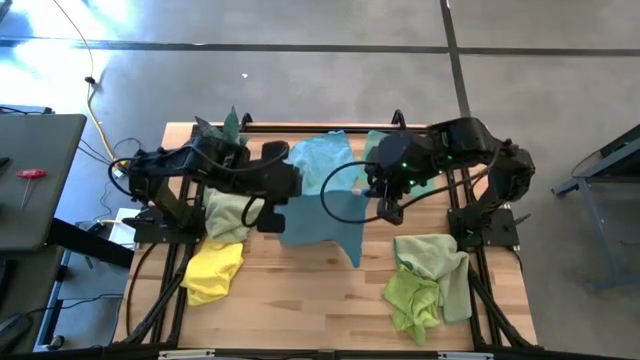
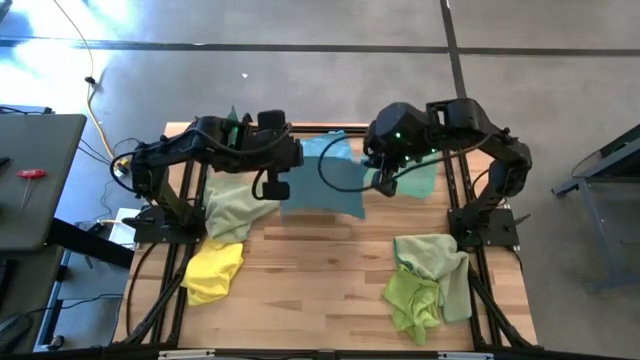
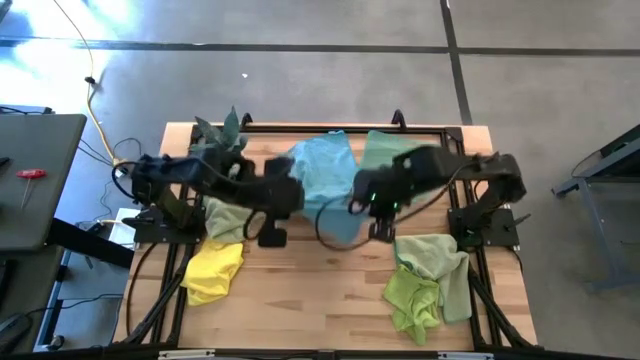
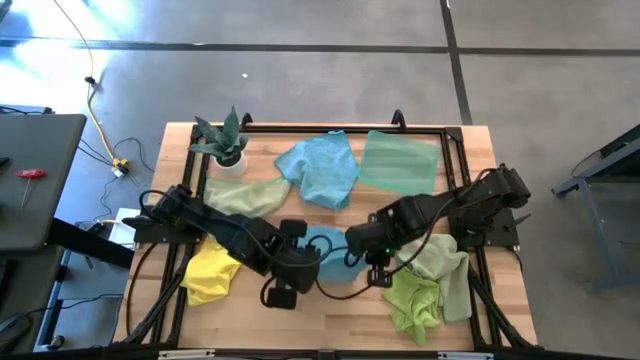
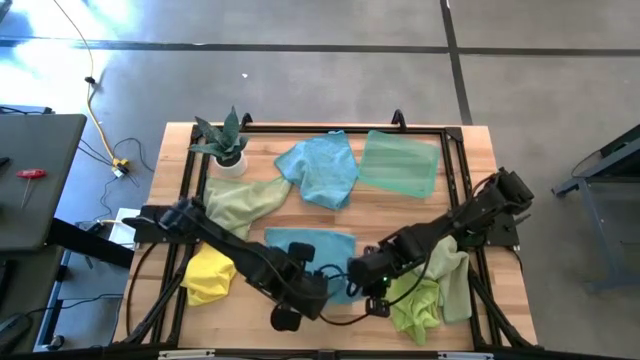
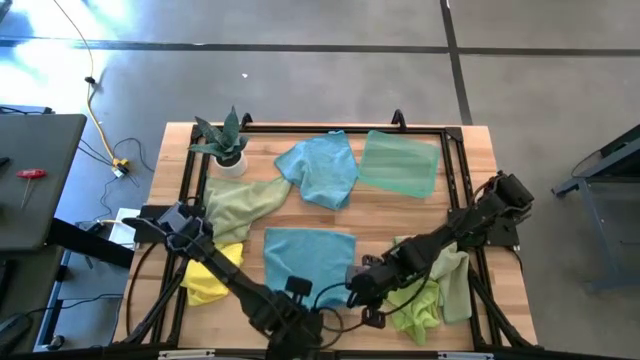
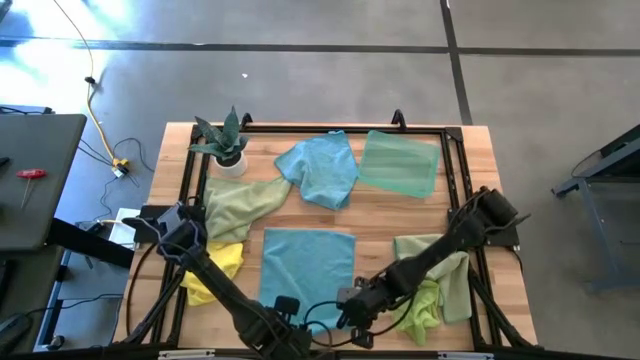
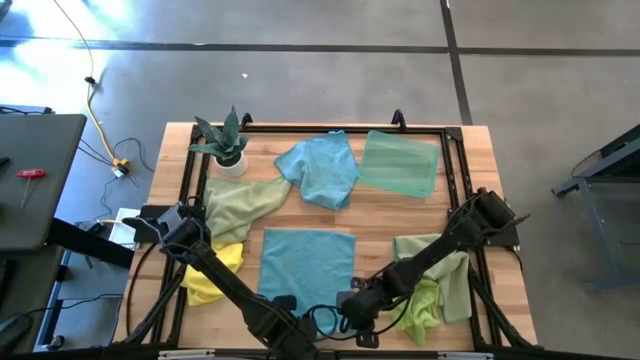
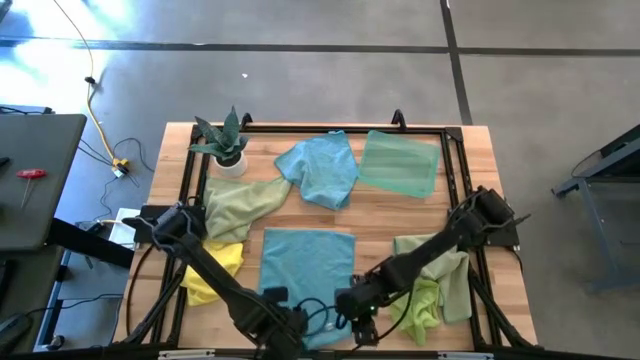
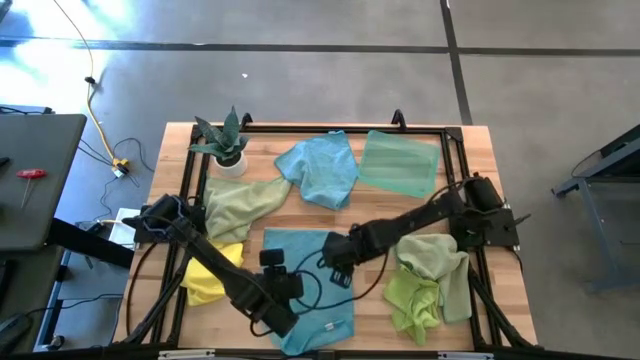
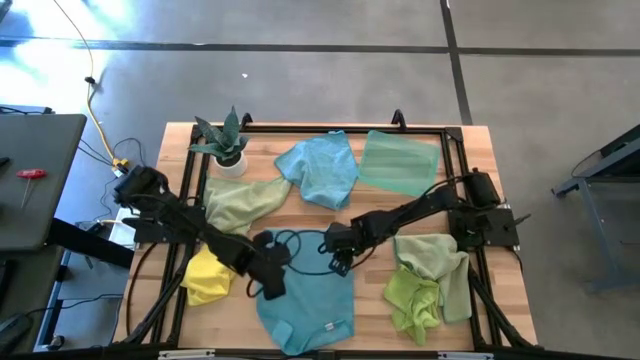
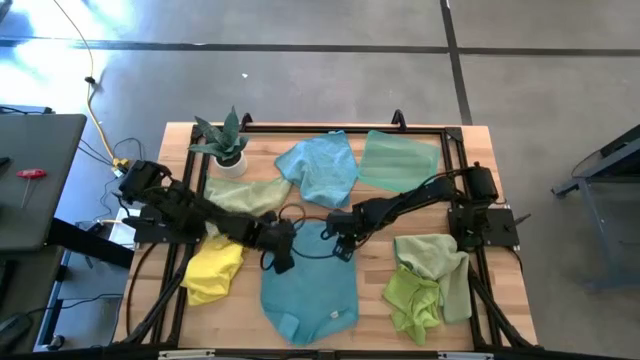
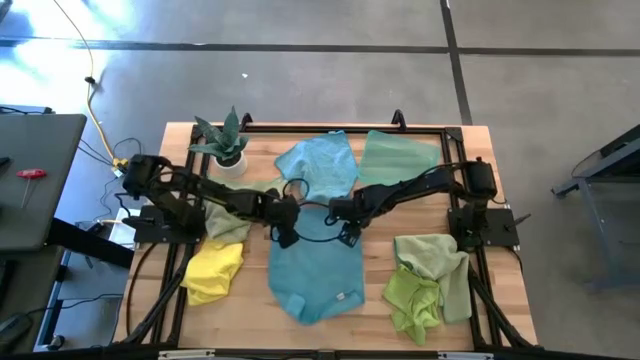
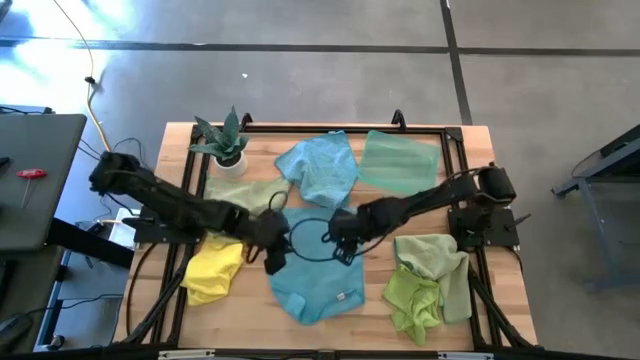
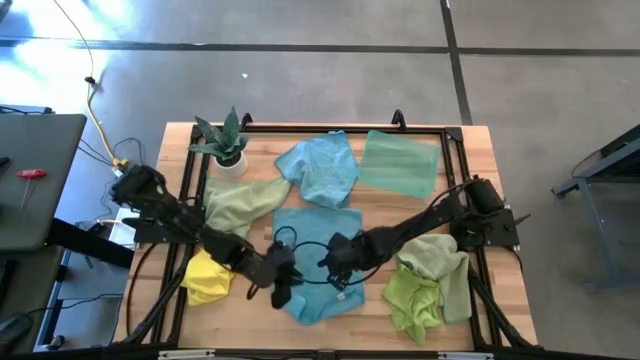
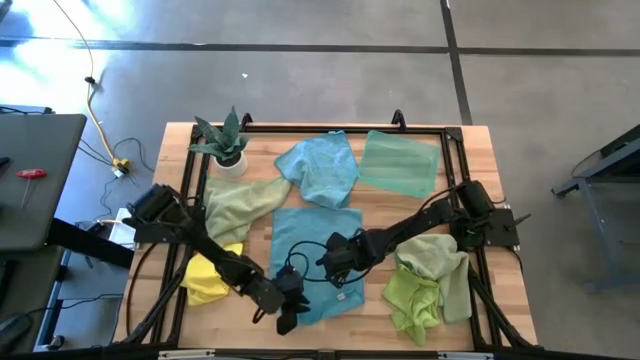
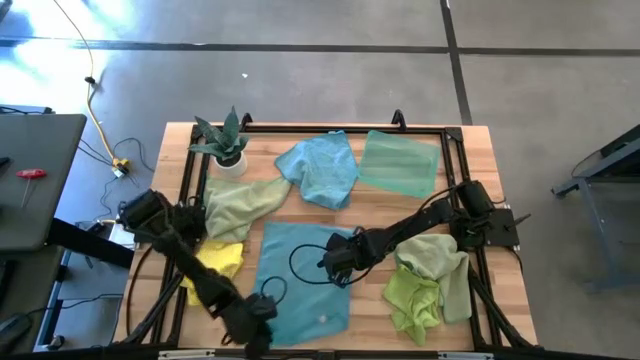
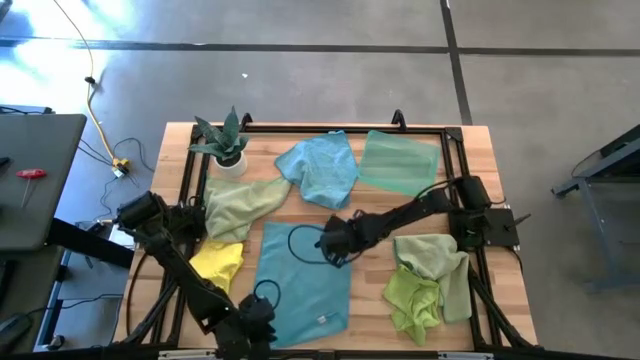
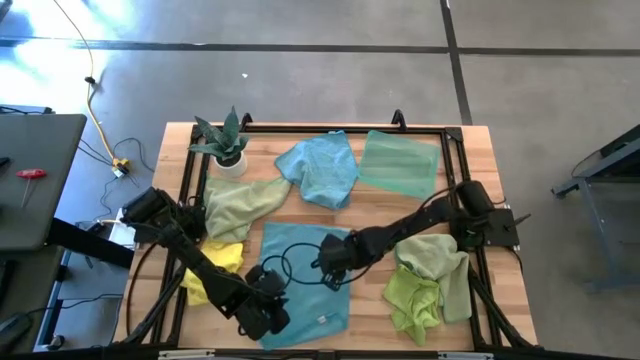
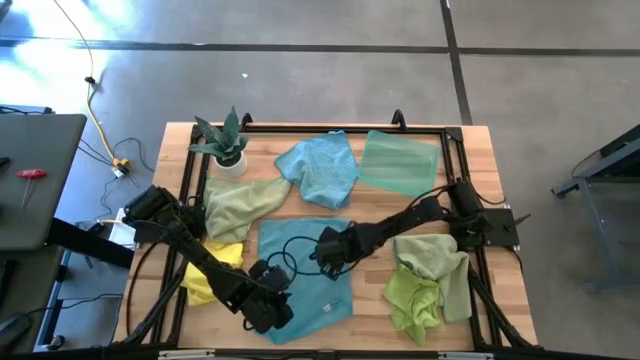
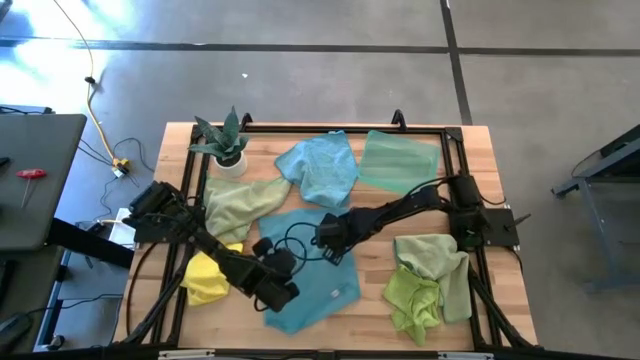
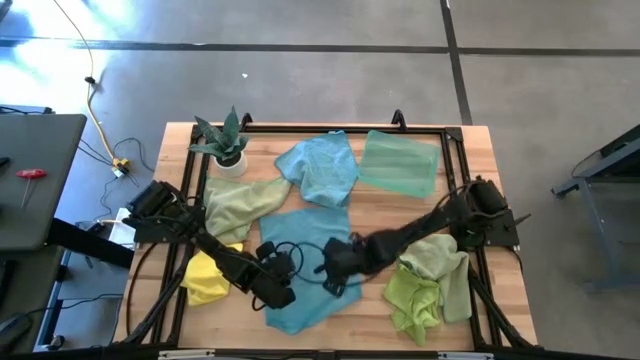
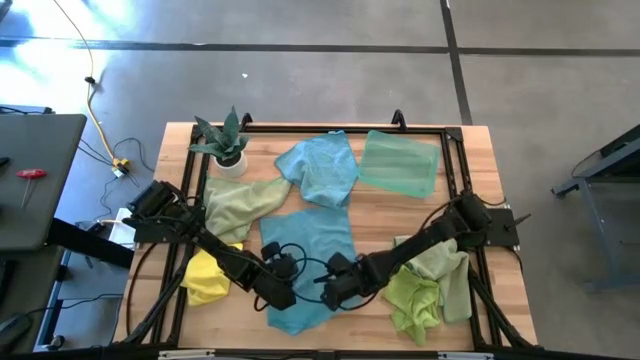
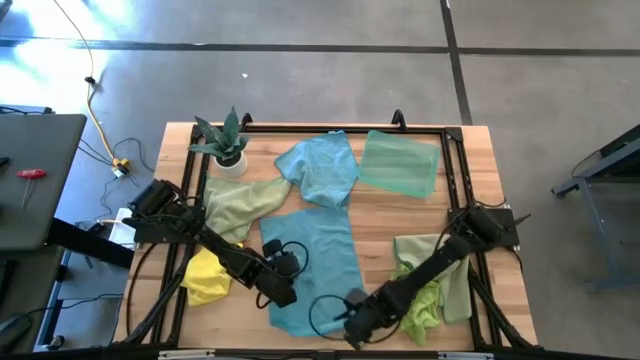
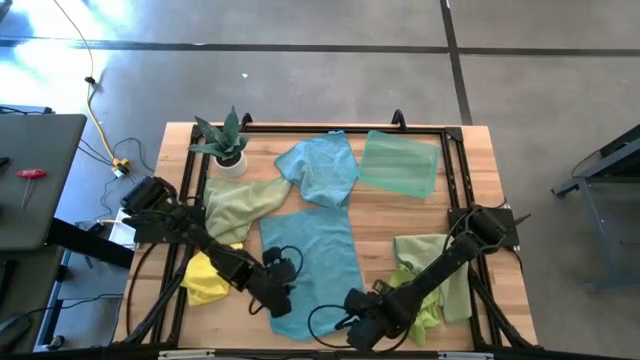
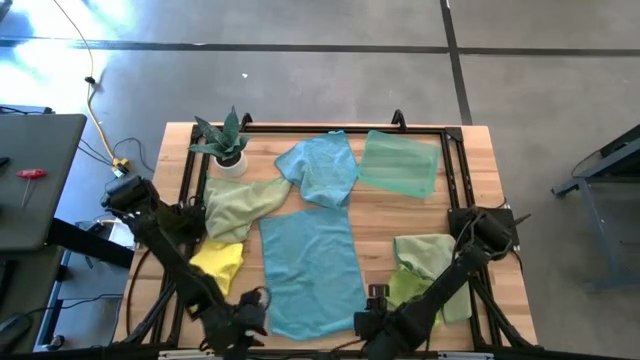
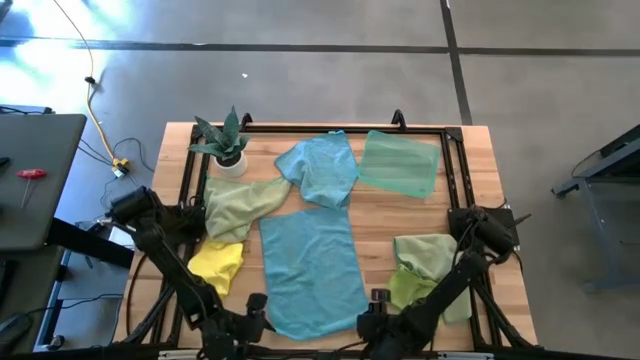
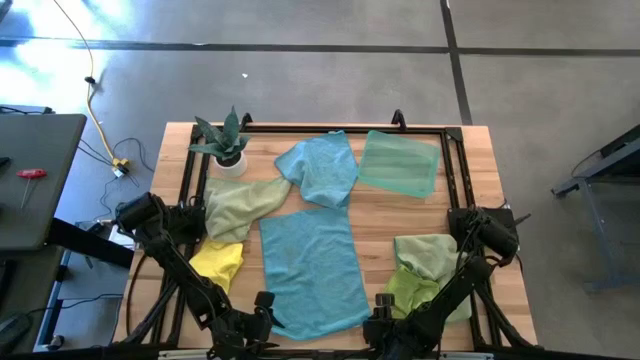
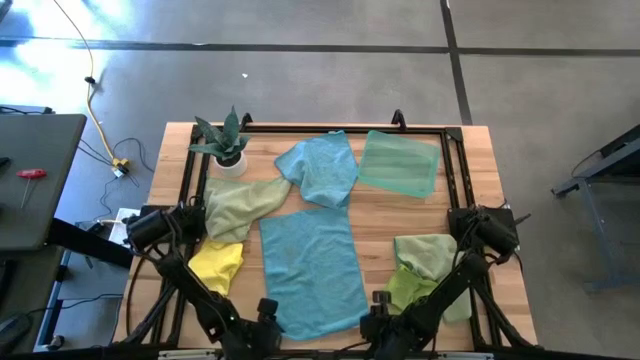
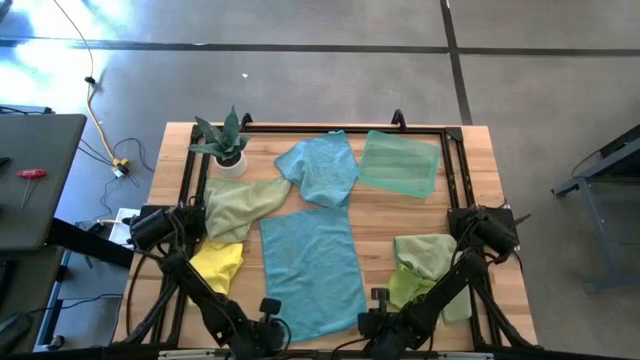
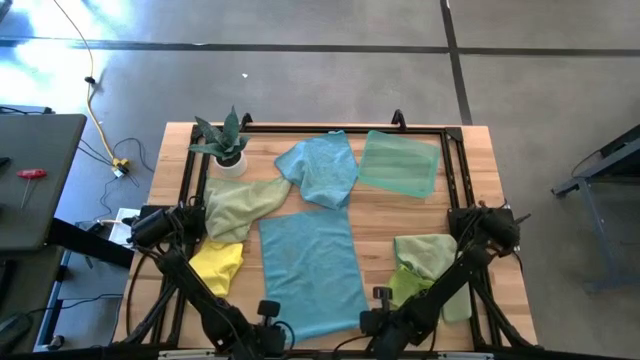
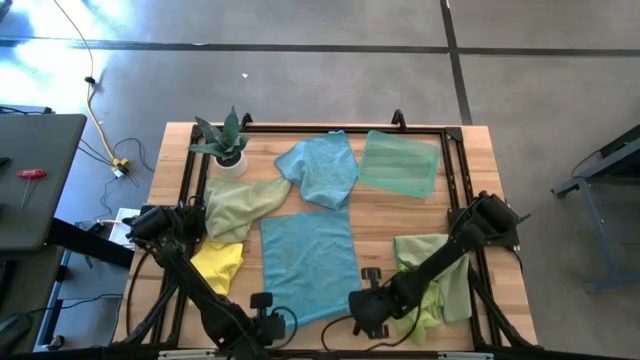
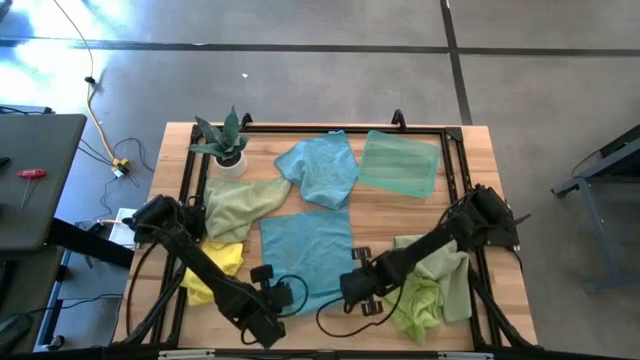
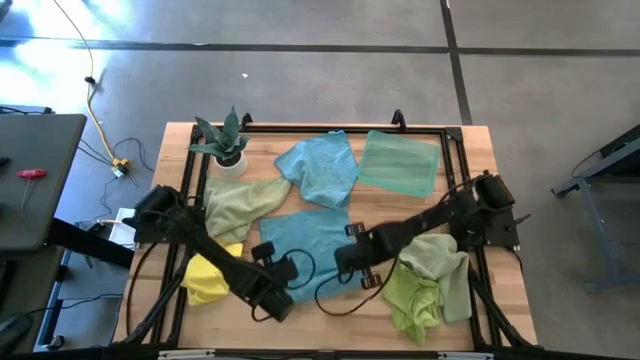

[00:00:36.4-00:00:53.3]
Task: Fold microfiber towels
Fold the bottom blue microfiber cloth

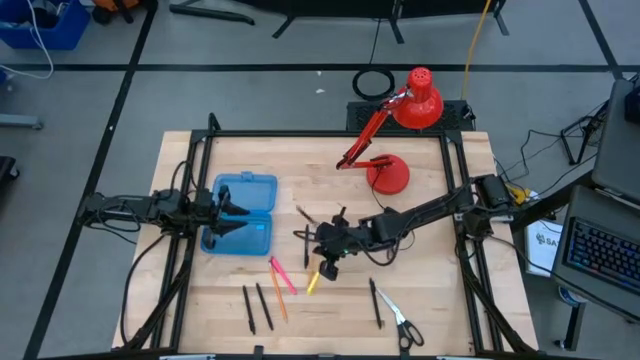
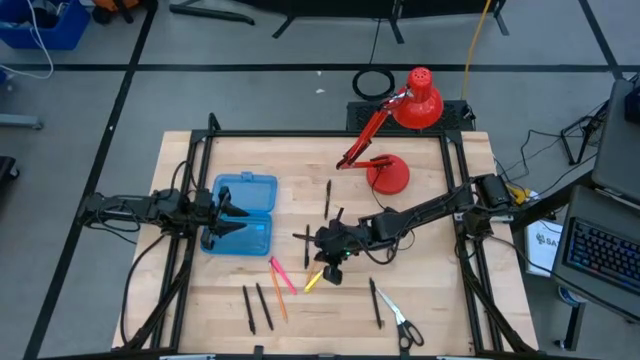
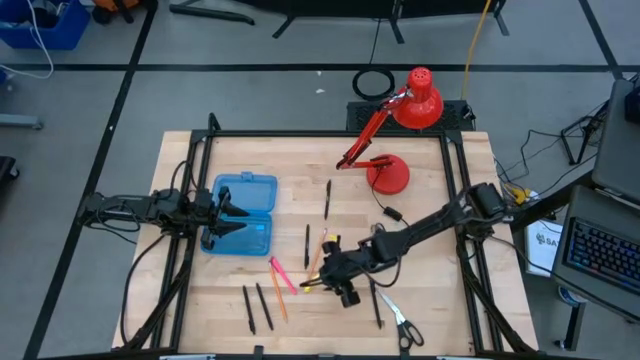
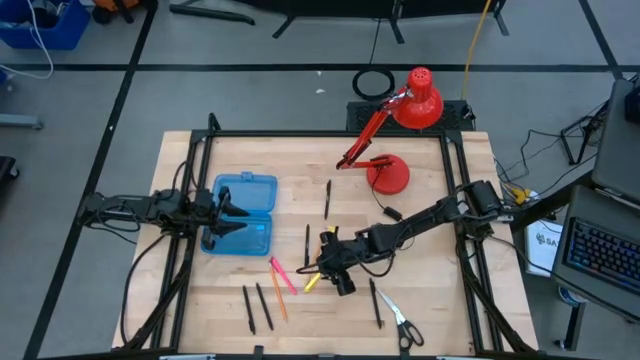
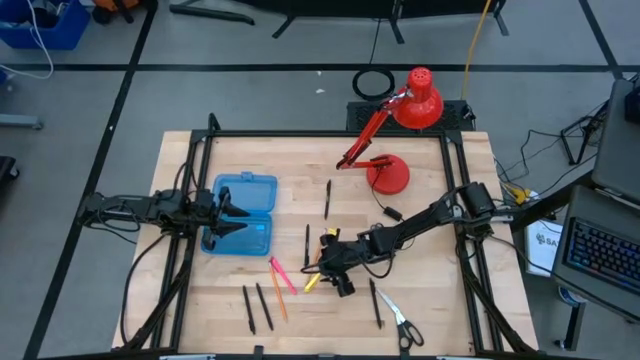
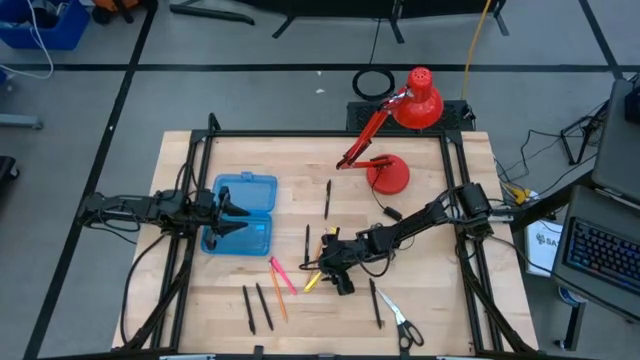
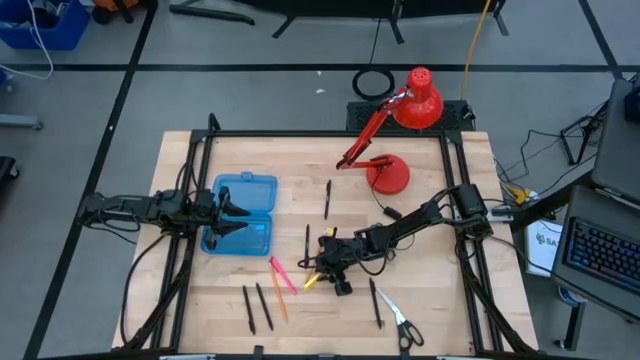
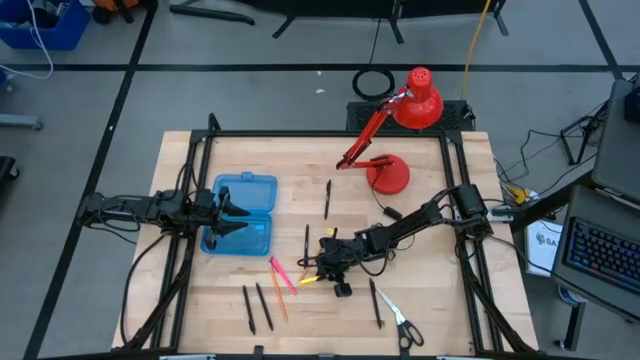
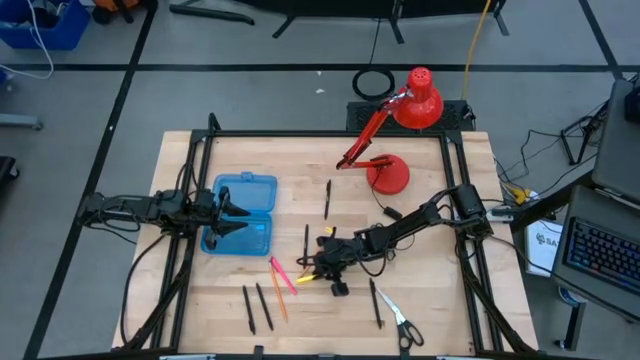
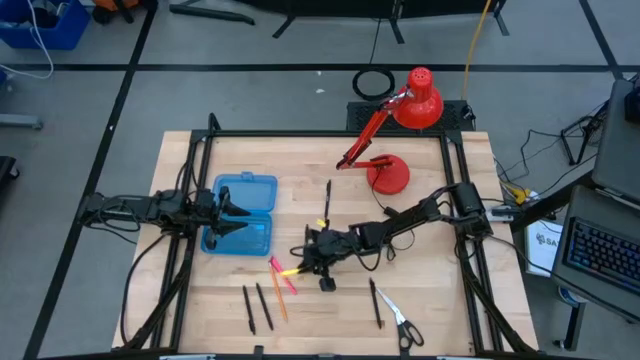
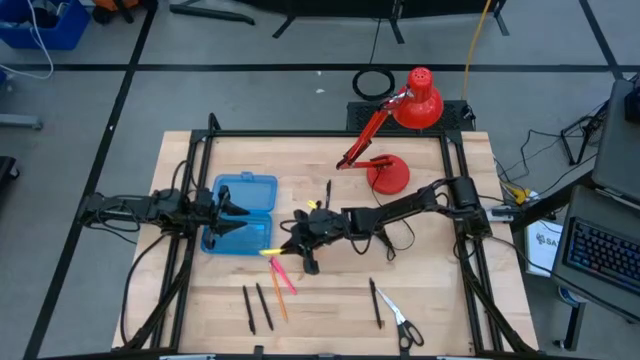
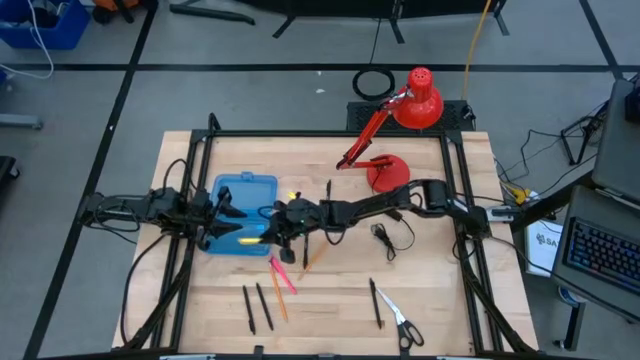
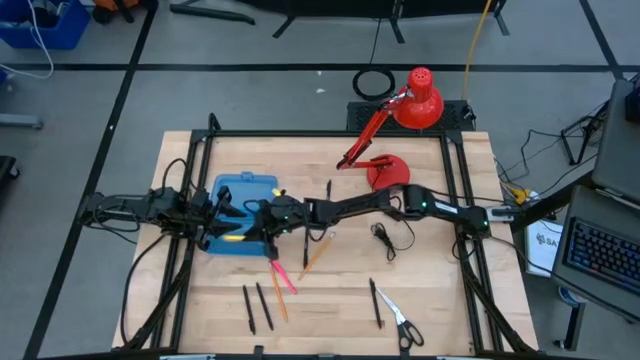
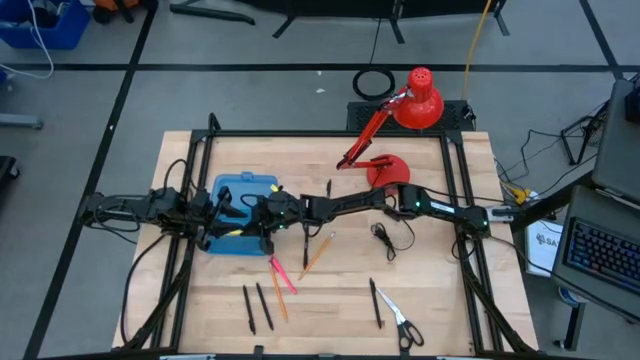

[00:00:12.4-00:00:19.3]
Task: Pick & place school supplies into a supply box
Put the yellow pen into the blue supply box
